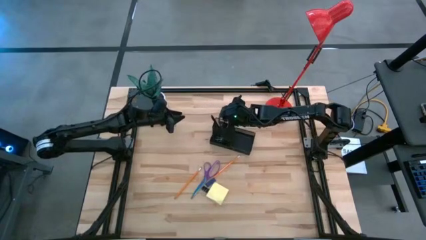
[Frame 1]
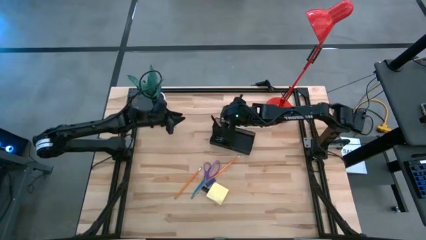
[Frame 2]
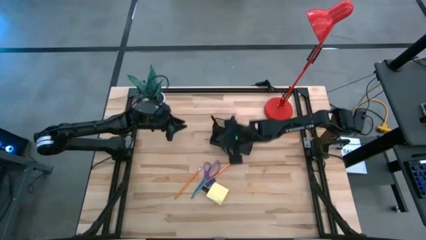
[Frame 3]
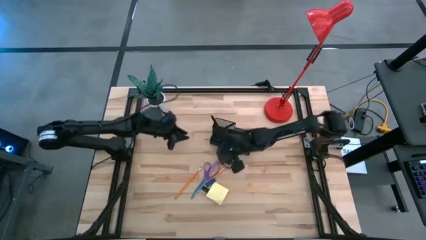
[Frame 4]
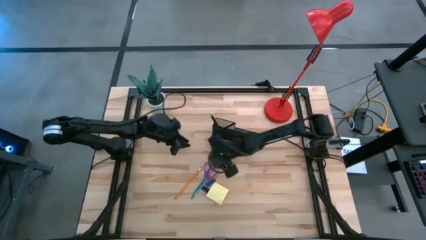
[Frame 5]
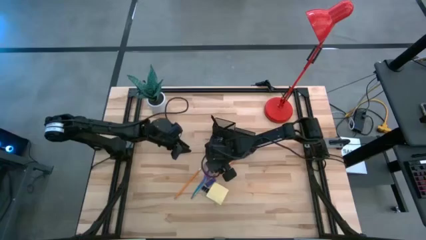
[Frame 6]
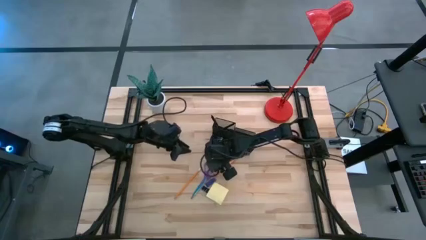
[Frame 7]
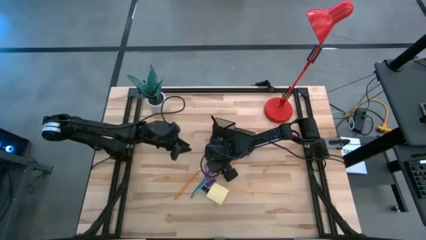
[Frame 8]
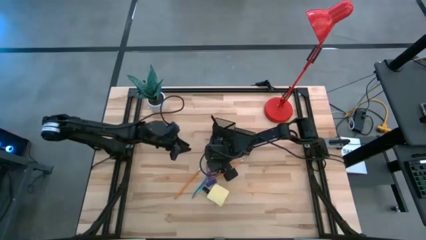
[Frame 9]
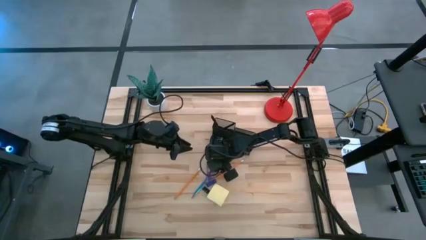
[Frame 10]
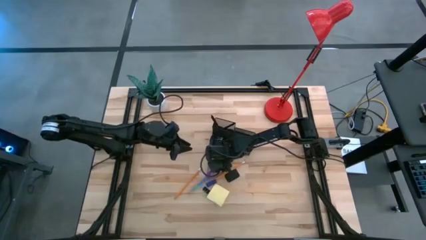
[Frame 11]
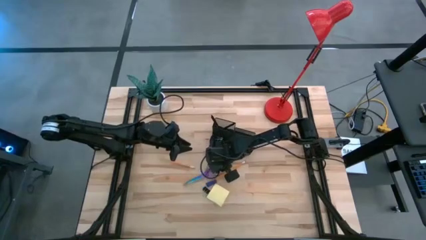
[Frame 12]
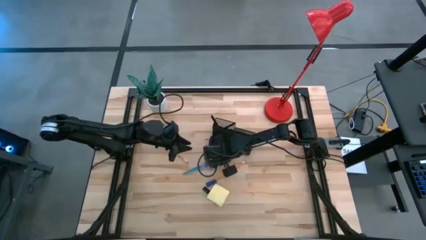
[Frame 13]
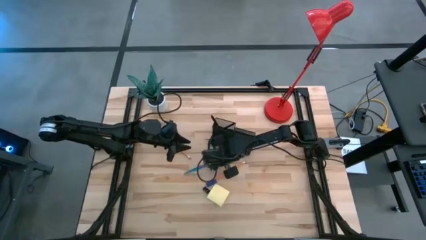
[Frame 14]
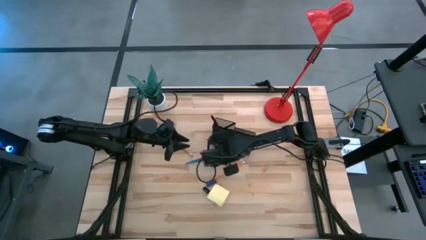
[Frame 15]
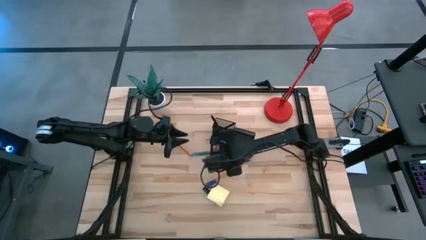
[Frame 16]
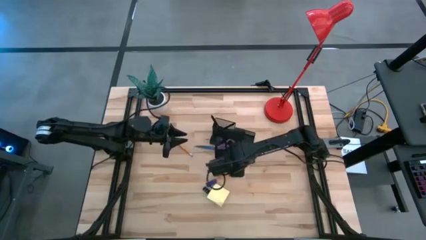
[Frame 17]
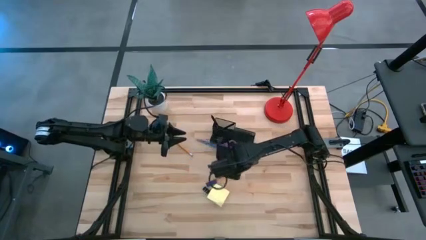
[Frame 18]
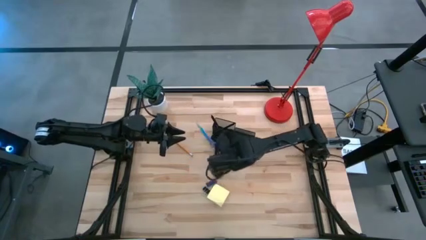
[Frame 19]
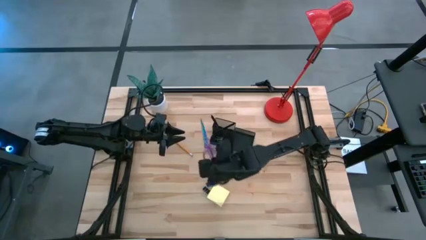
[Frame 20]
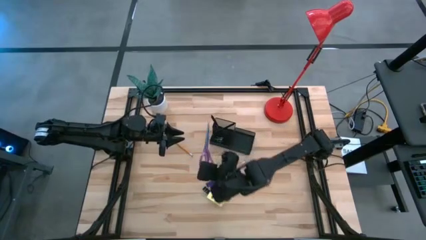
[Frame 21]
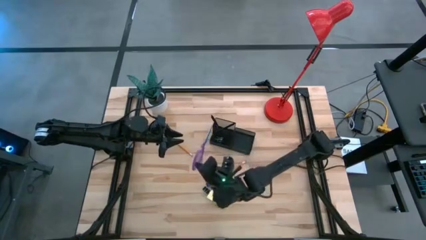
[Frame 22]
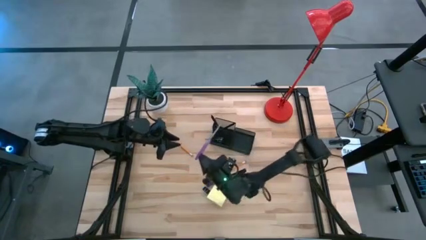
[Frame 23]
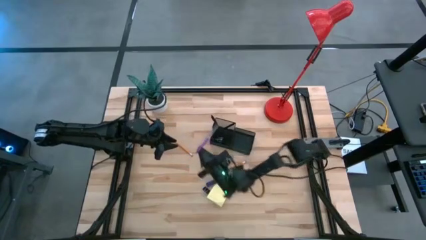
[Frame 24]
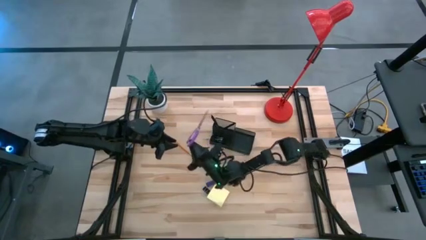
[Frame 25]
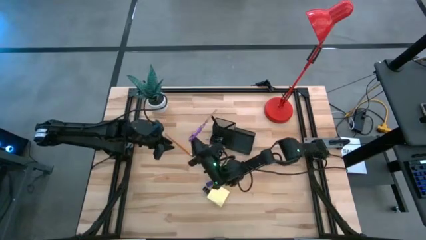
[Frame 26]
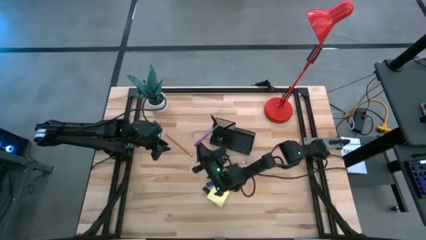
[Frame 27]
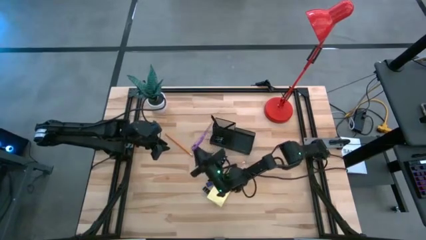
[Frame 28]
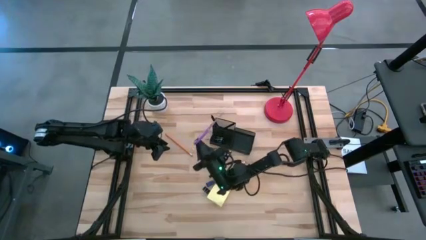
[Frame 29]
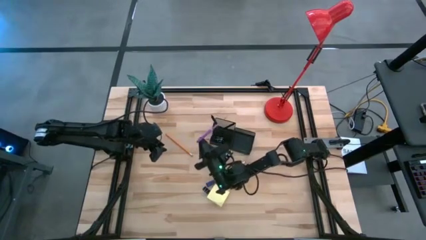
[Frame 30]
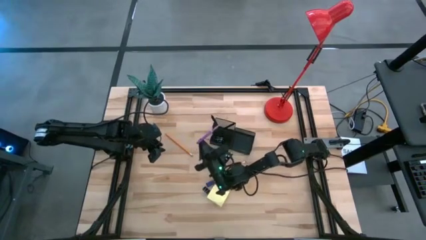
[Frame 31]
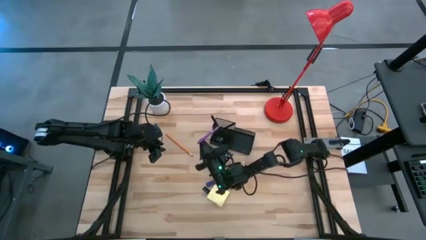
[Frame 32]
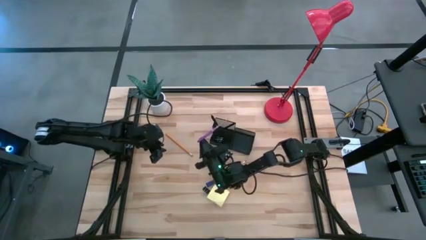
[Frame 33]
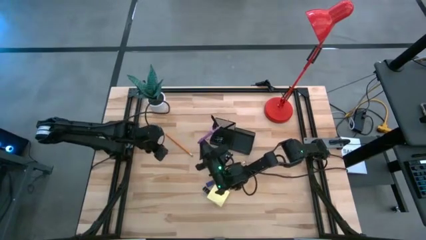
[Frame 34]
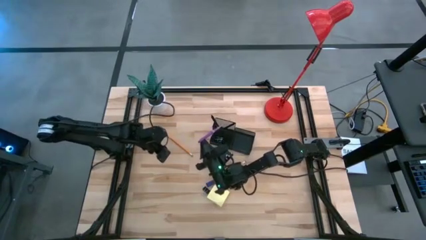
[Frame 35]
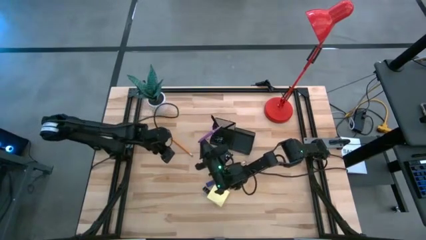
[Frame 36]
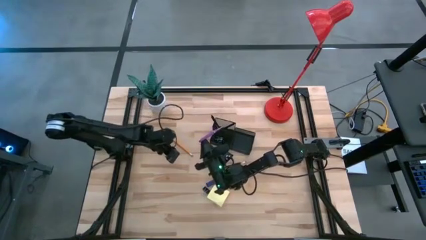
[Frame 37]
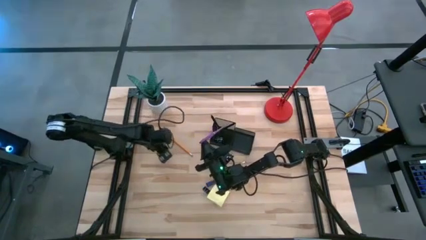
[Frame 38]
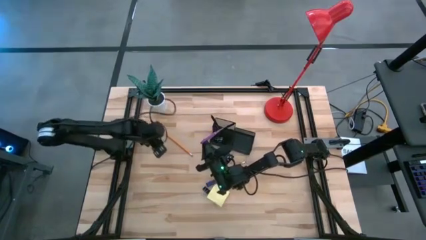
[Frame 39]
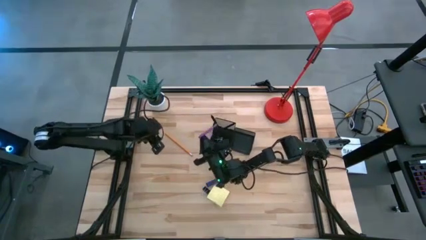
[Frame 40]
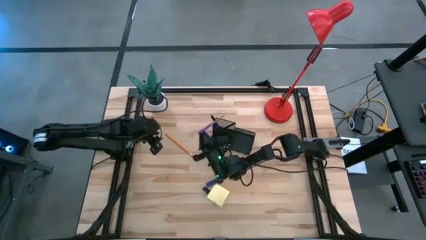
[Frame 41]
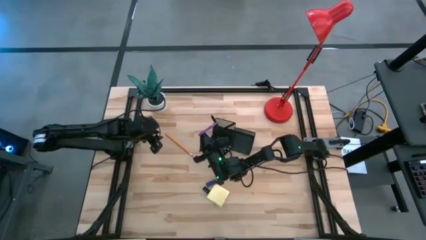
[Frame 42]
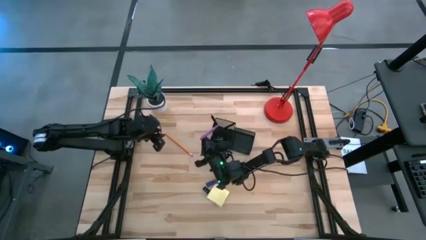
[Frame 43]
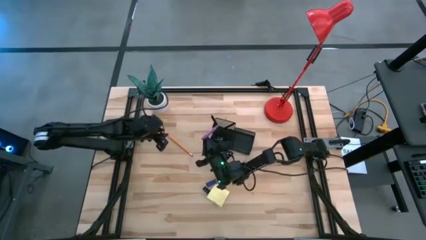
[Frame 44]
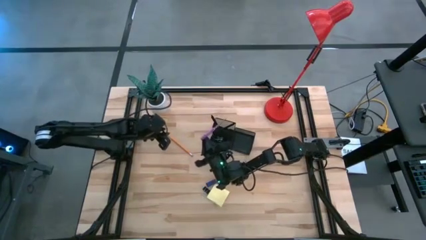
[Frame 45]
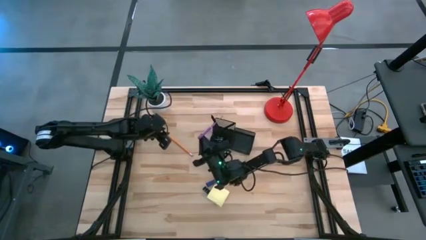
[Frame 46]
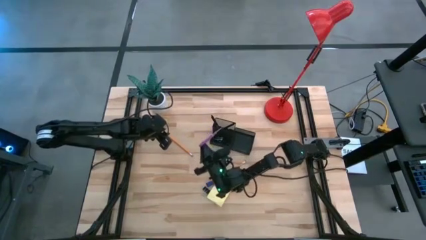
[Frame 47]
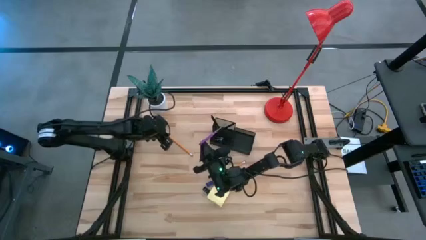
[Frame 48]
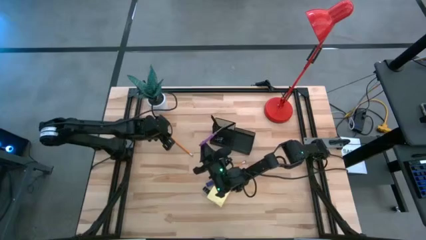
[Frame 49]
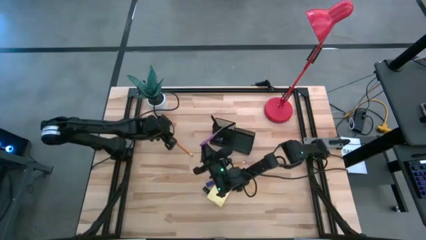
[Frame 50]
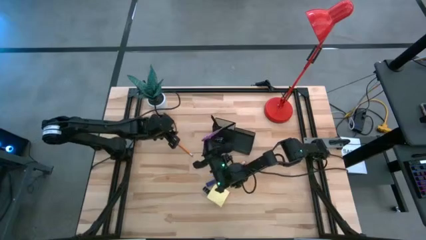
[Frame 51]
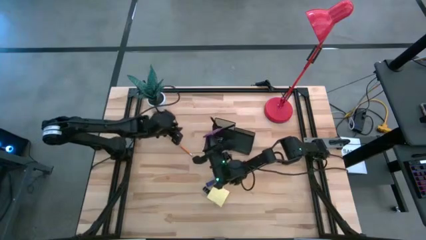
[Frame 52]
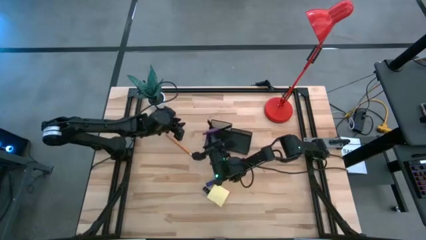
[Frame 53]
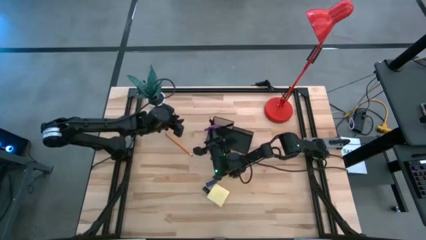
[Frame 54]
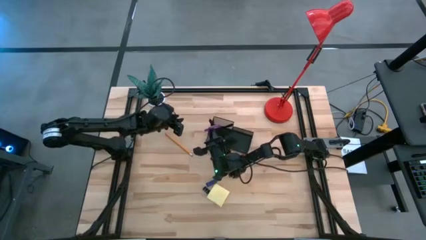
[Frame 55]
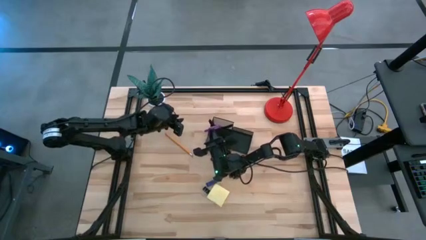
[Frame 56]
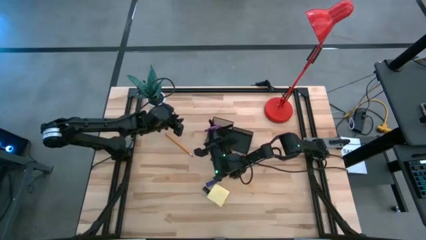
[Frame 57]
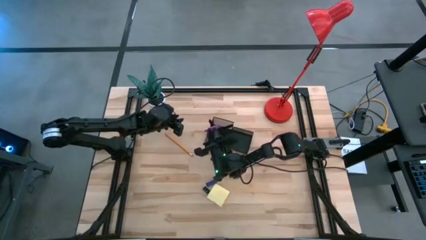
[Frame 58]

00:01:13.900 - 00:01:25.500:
Task: Pick and place office supplies into organizer
Put the purple scissors into the black desk organizer

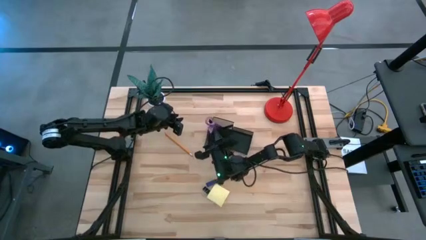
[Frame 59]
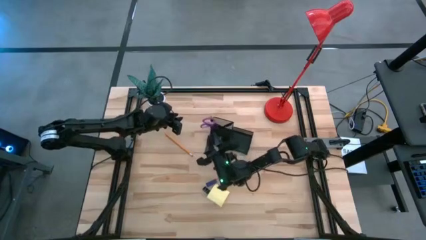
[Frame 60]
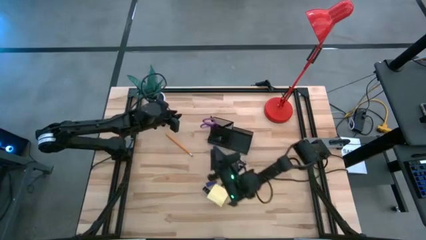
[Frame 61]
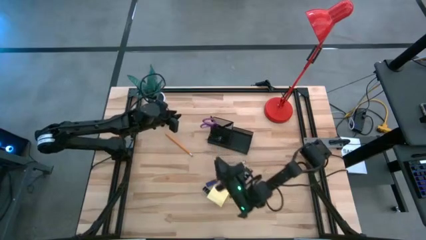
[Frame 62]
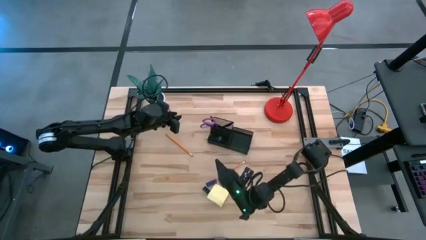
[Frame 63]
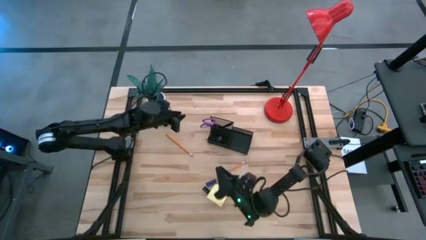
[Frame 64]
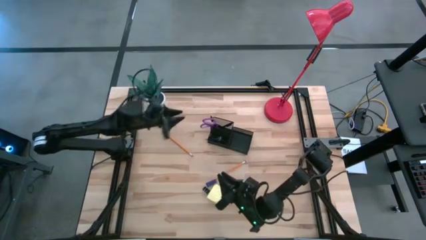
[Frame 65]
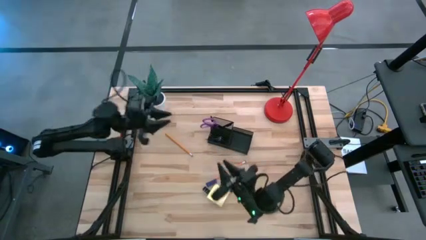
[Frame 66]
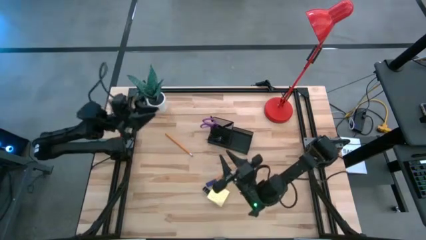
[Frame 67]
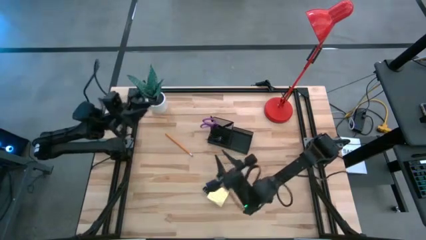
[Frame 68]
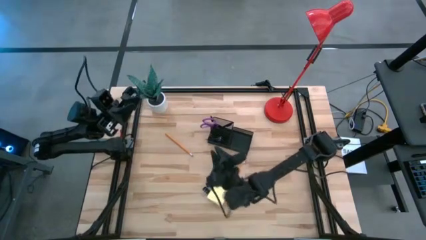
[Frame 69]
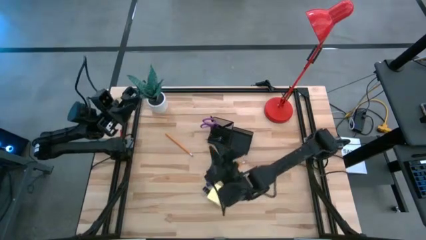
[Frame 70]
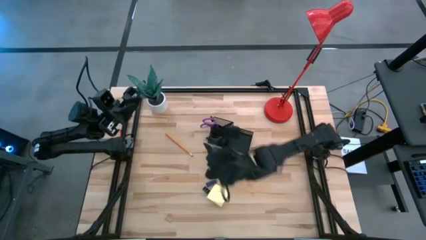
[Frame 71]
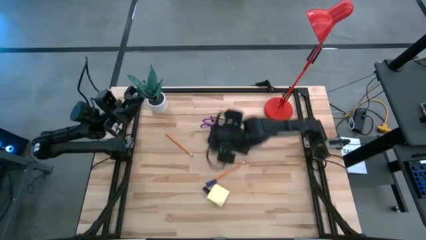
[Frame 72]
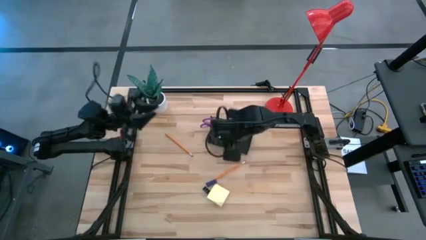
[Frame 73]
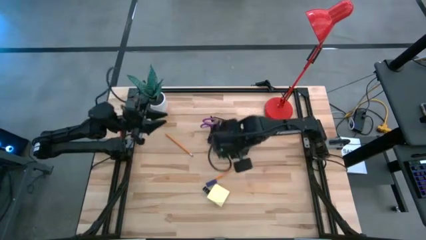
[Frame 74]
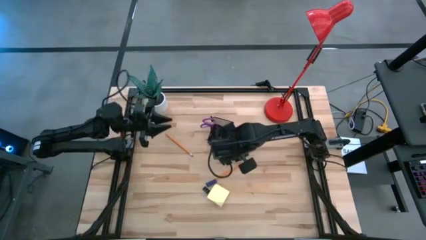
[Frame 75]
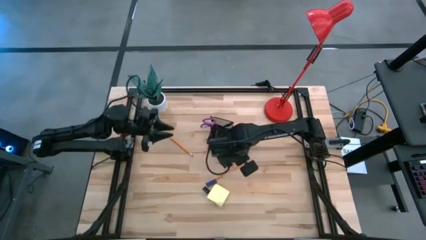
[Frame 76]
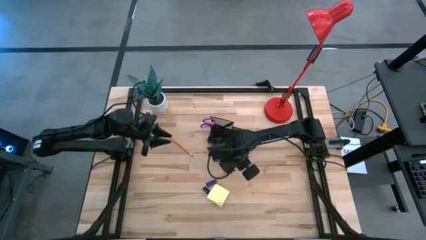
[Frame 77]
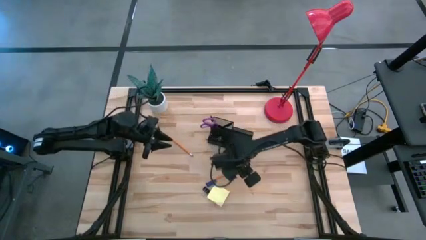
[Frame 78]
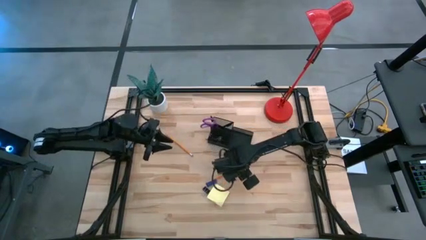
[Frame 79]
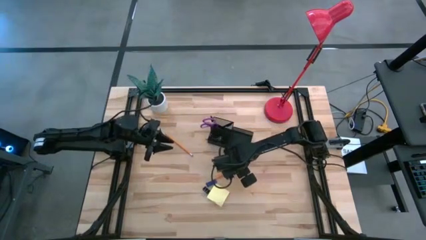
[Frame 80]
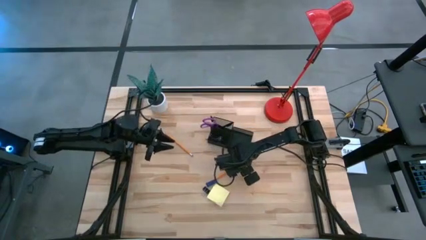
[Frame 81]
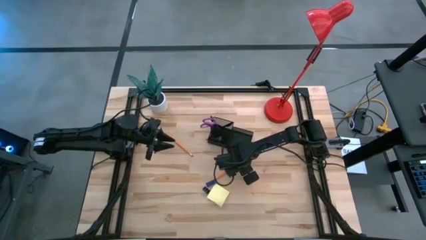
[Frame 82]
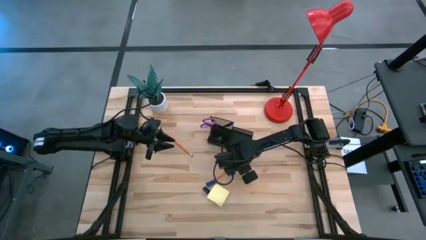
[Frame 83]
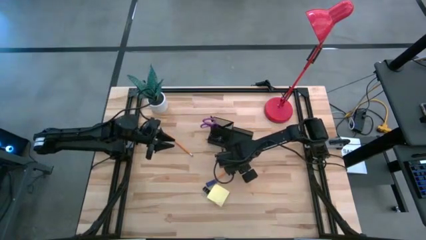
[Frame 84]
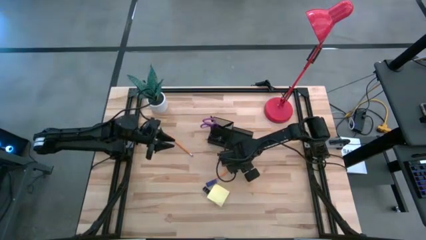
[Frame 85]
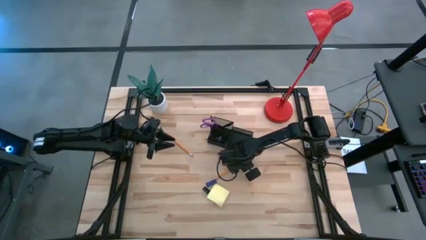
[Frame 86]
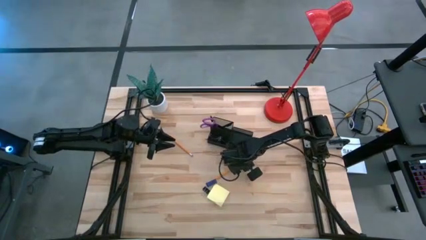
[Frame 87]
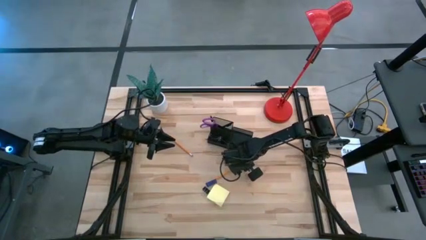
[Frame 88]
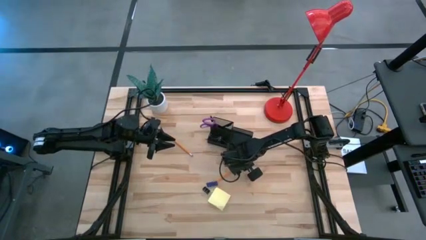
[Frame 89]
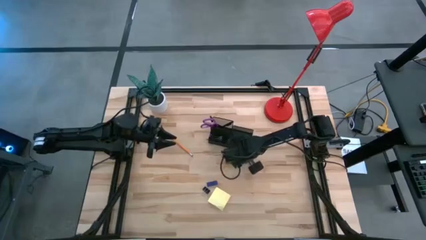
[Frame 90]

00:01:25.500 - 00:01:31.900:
Put the bottom orange pencil into the black desk organizer
